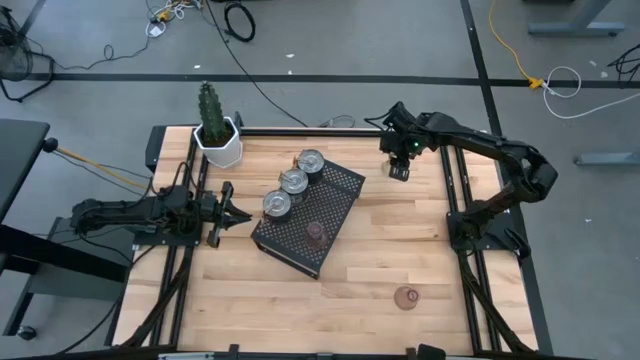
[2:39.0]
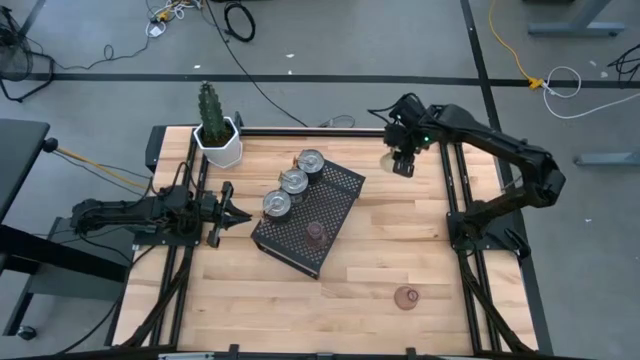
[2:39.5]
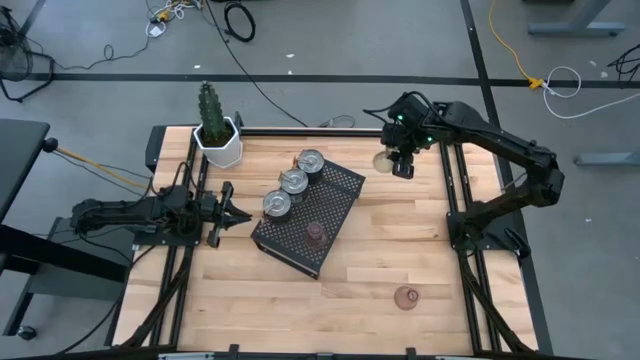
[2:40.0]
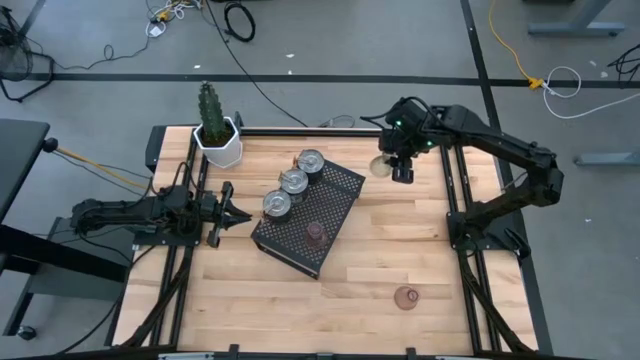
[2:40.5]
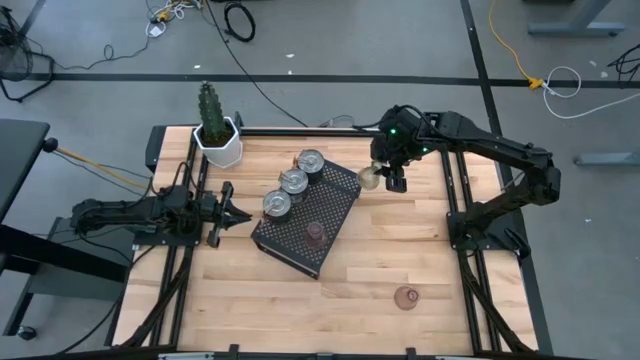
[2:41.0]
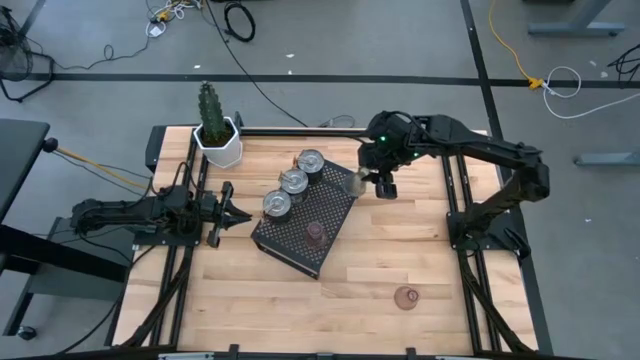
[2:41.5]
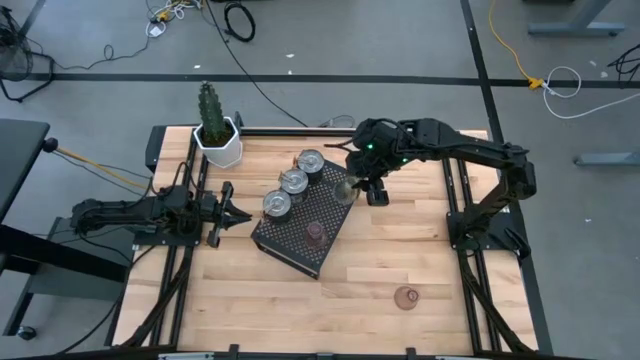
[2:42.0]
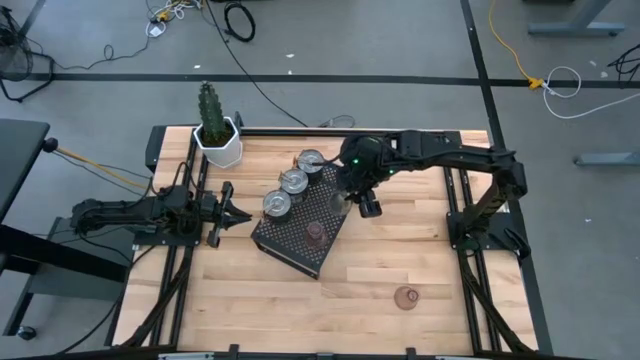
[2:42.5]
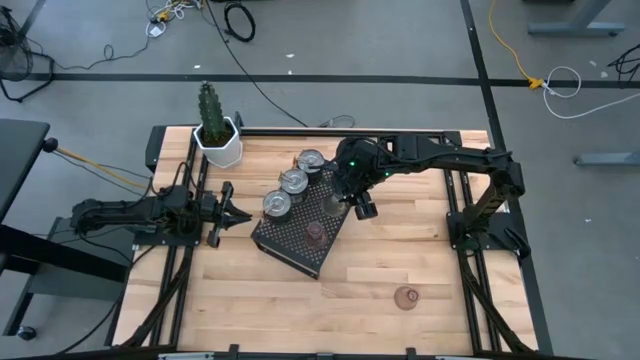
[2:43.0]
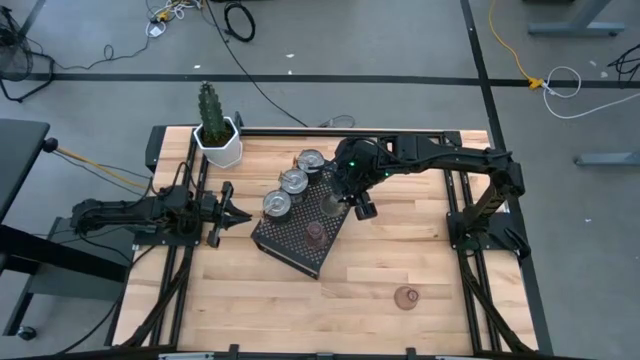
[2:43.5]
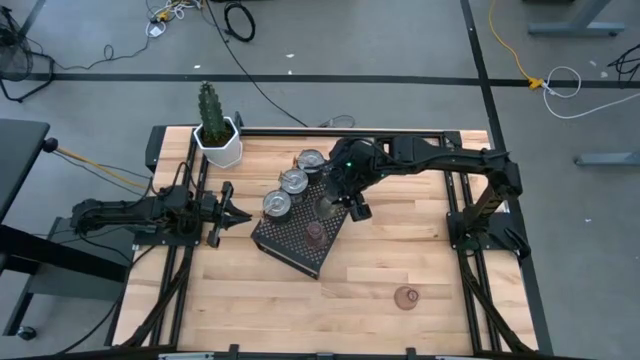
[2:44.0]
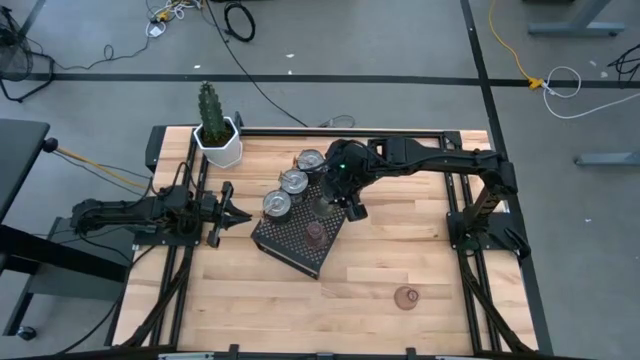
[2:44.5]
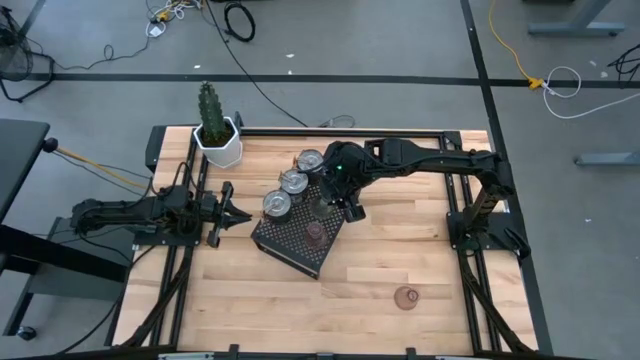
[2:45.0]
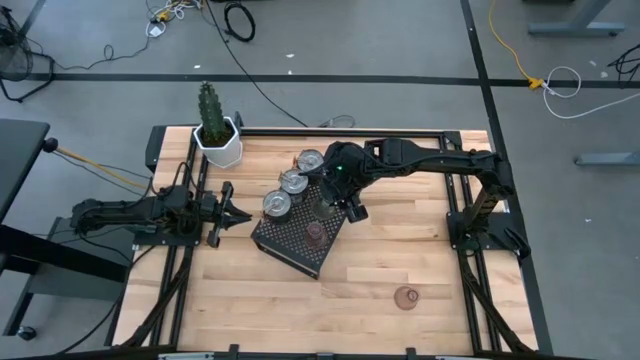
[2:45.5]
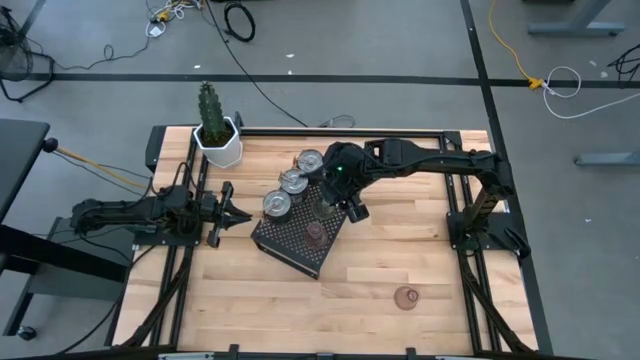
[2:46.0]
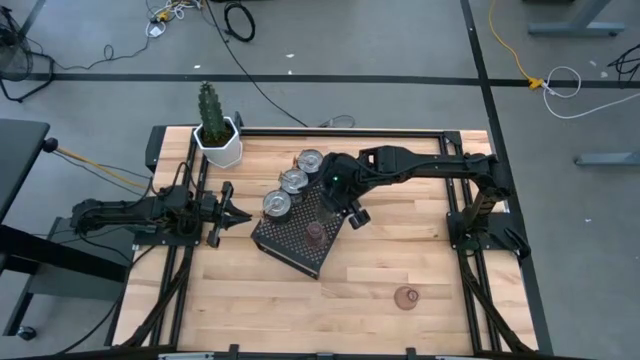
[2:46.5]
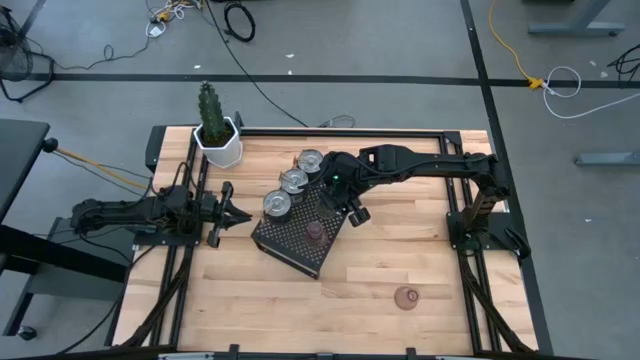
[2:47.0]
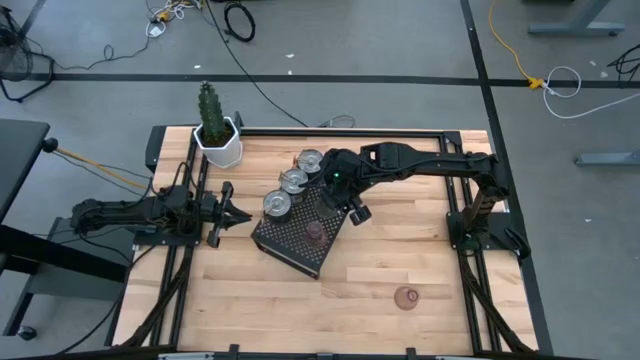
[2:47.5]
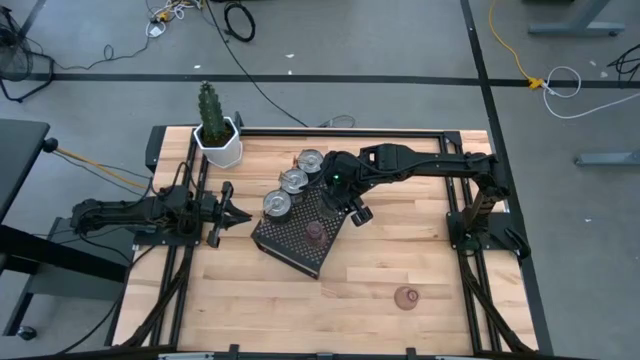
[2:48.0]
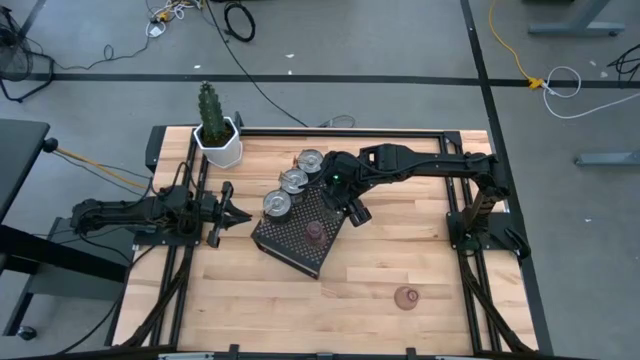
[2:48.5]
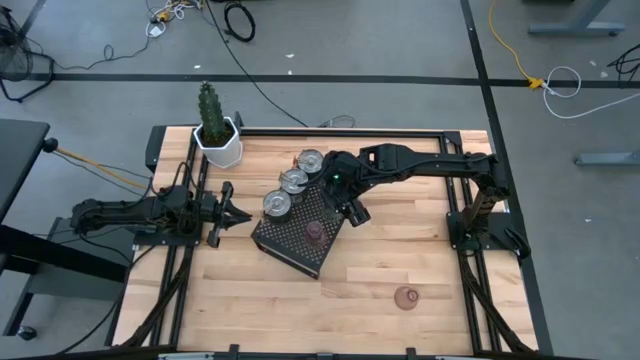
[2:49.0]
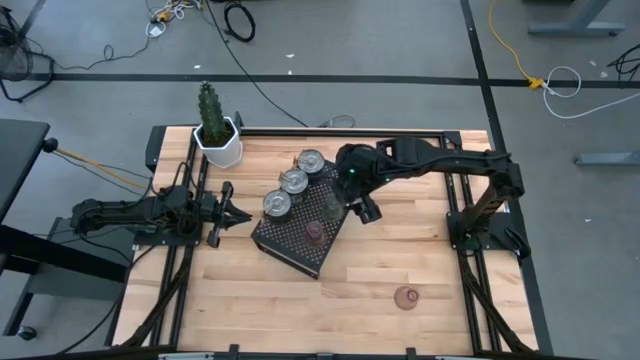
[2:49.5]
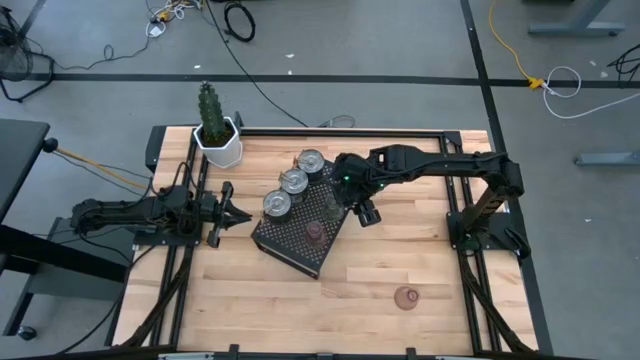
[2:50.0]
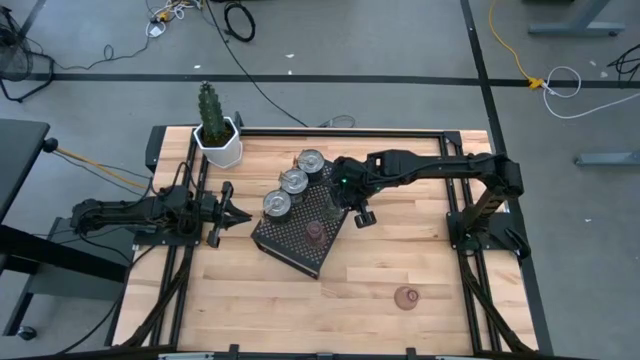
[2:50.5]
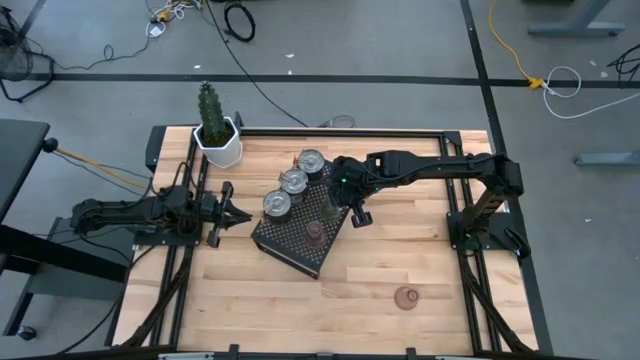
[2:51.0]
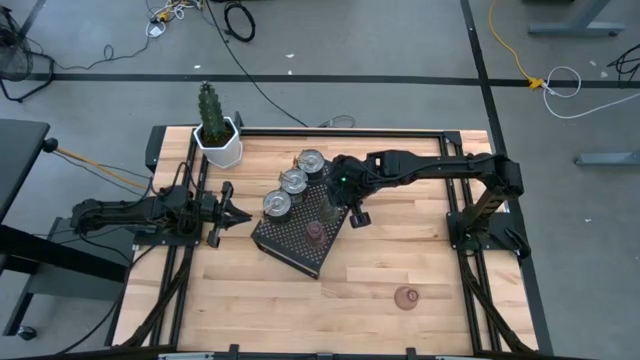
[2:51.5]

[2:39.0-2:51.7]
Task: Pick & Place candle stick holders
Put the green candle holder on the shelf

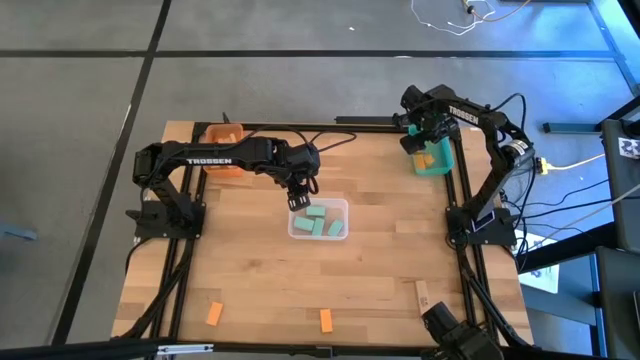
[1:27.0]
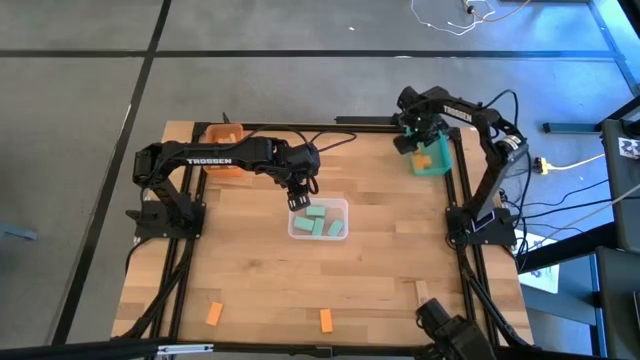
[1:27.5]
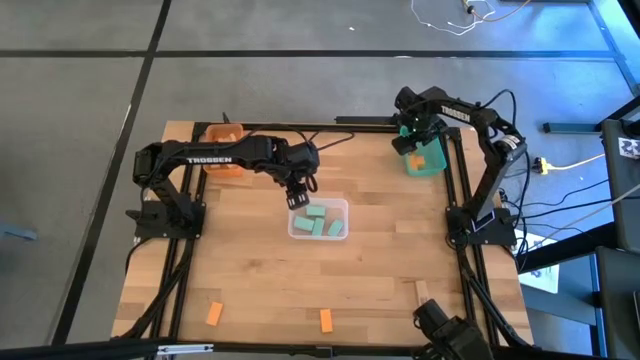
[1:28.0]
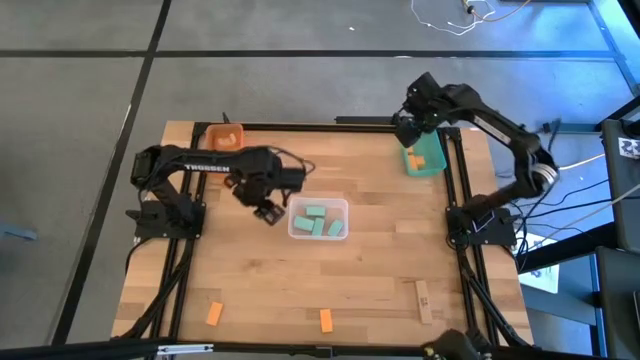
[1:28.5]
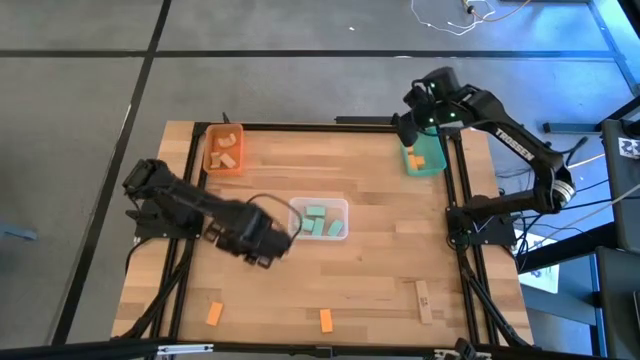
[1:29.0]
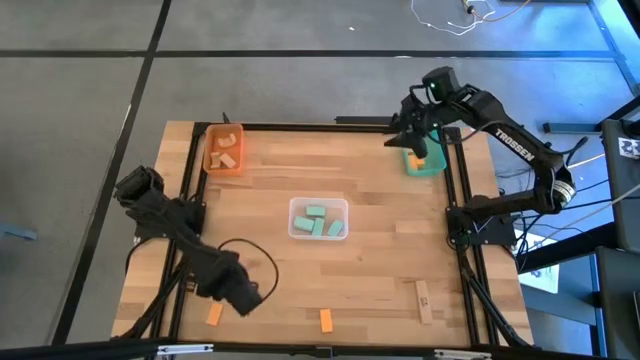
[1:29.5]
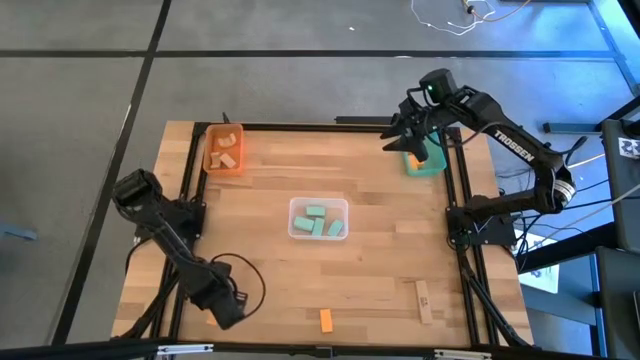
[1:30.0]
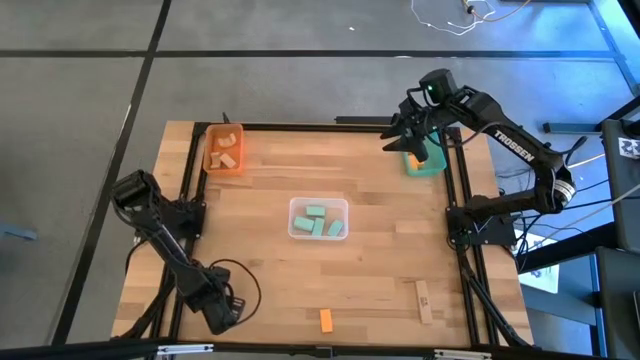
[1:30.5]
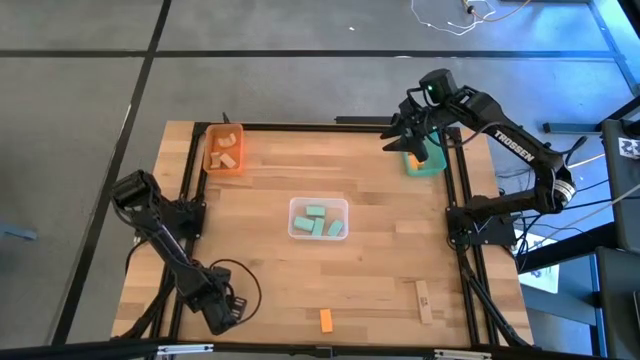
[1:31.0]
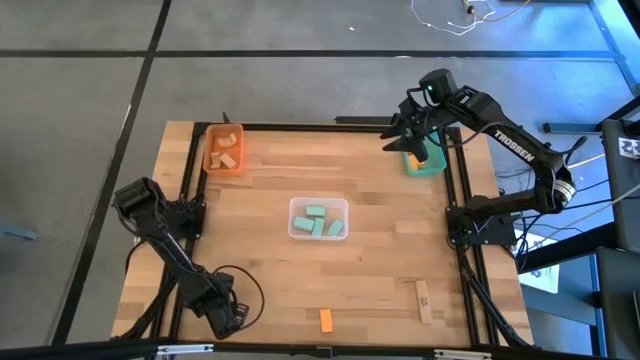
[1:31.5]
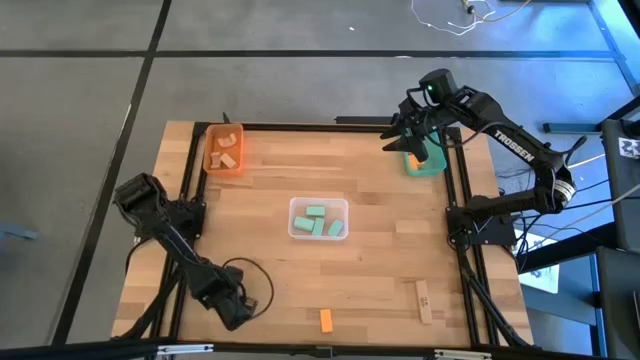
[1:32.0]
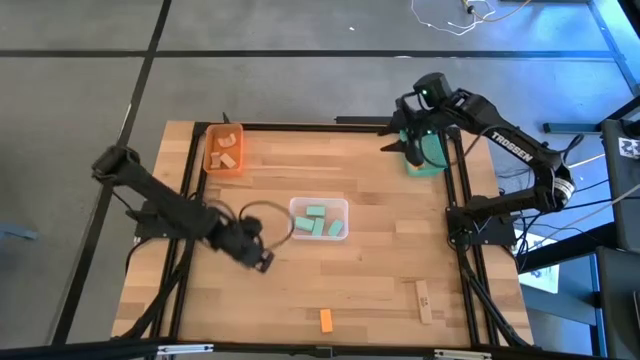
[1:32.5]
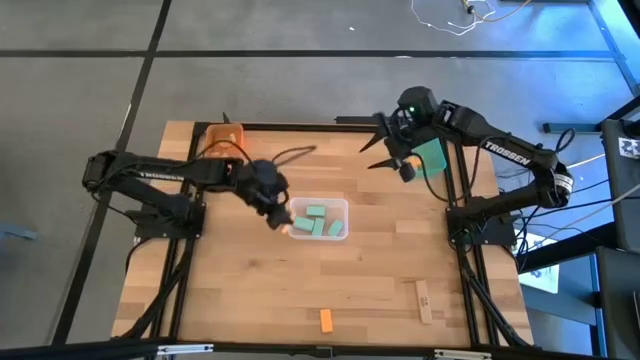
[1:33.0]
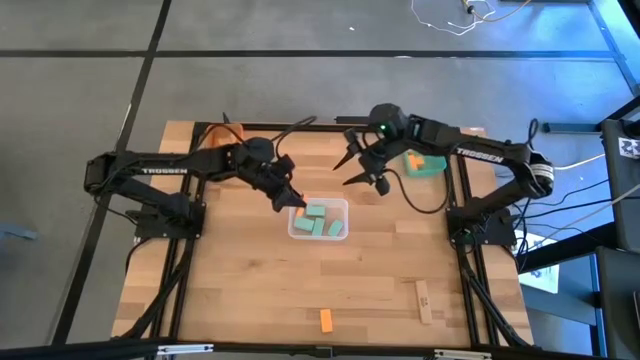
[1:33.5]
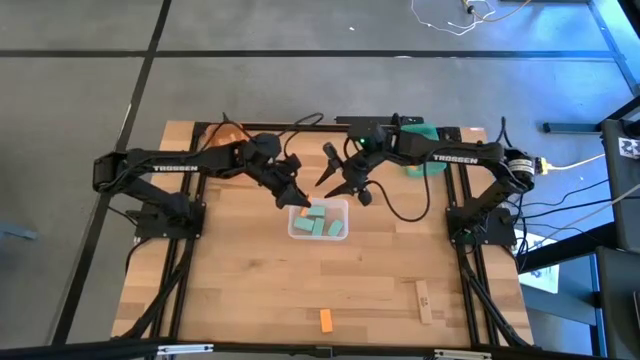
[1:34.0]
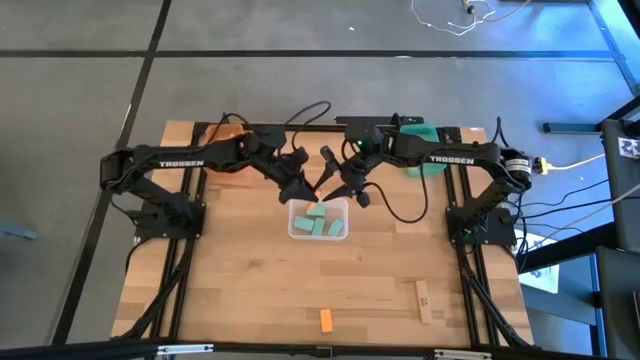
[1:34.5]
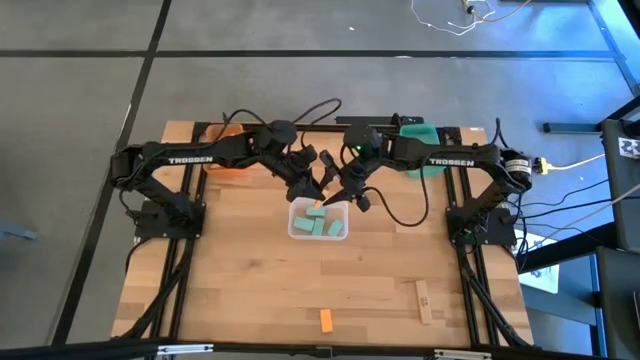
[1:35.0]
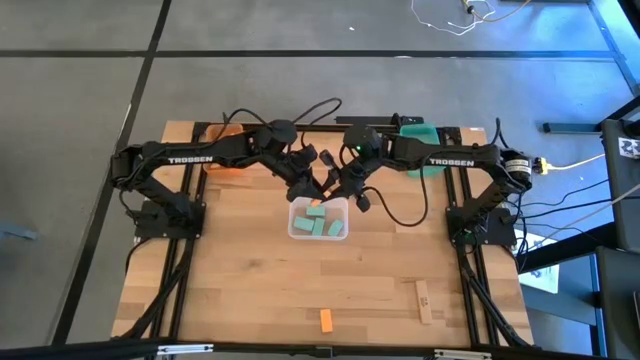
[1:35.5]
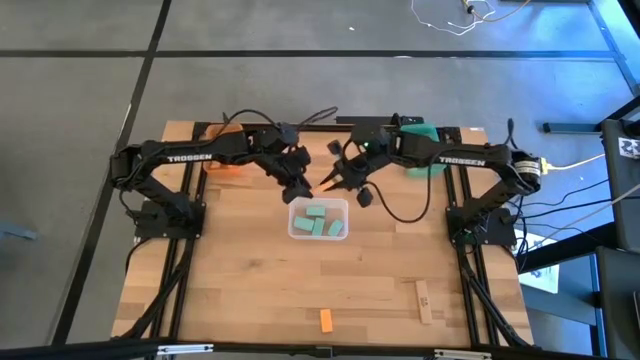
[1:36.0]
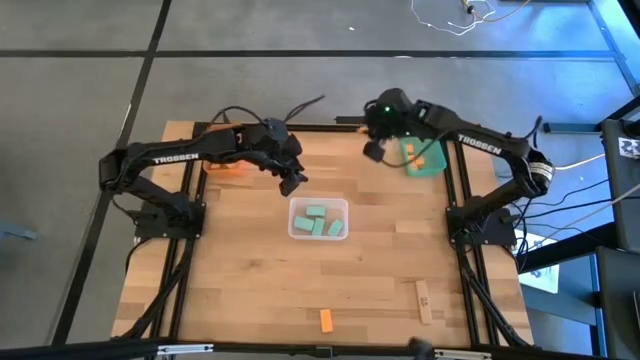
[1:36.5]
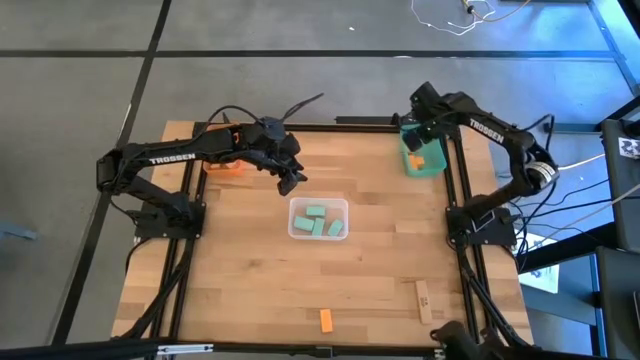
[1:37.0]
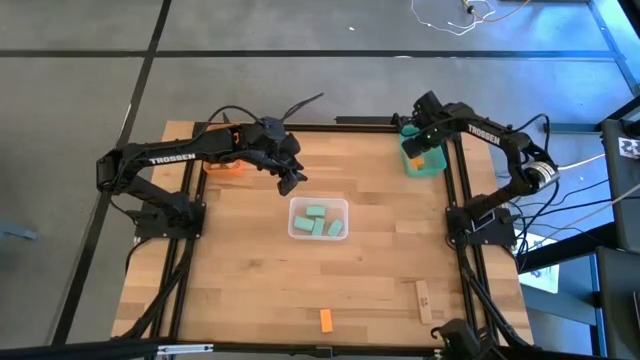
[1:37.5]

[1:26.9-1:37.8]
Task: Sort & place blocks by color
Put the yellow block into the blue bin
